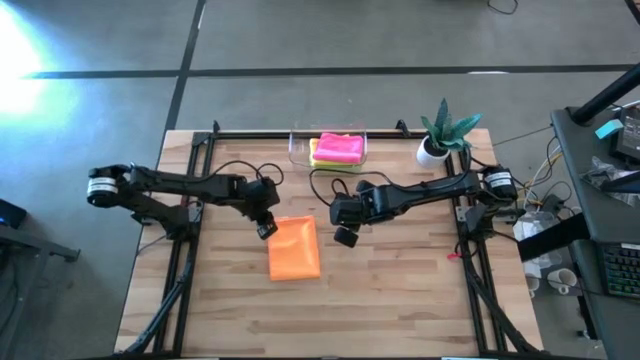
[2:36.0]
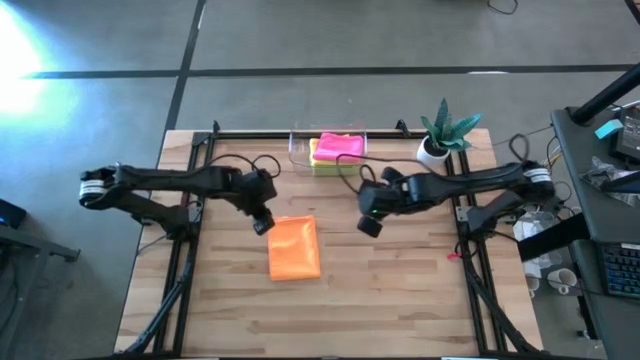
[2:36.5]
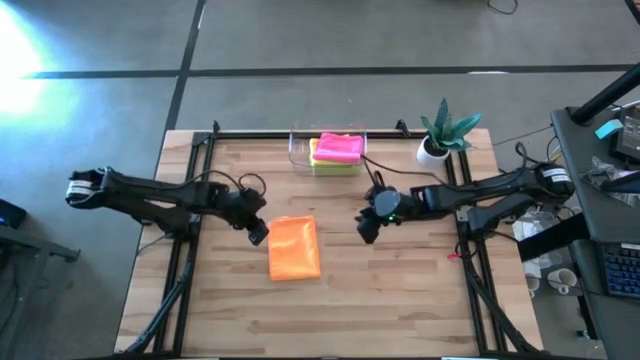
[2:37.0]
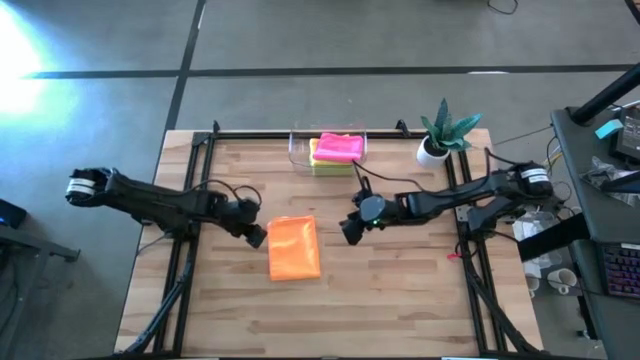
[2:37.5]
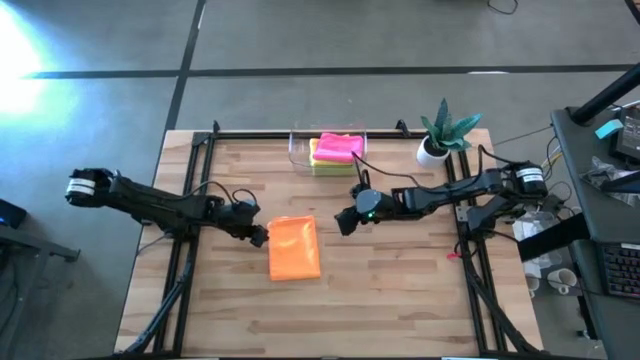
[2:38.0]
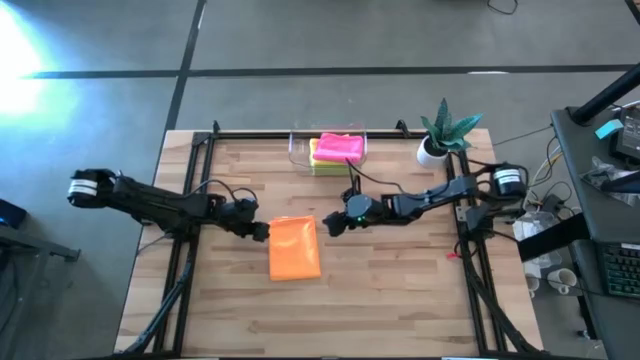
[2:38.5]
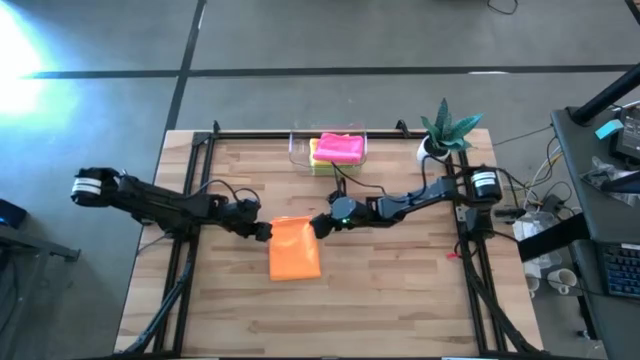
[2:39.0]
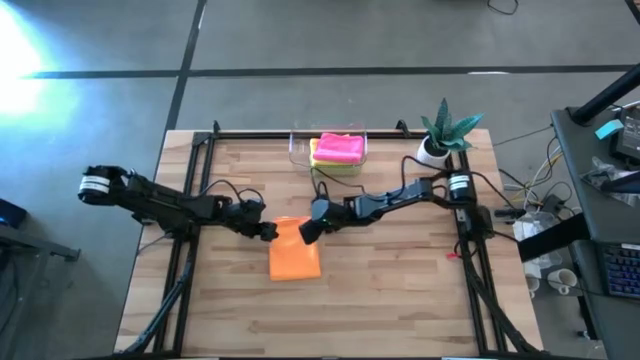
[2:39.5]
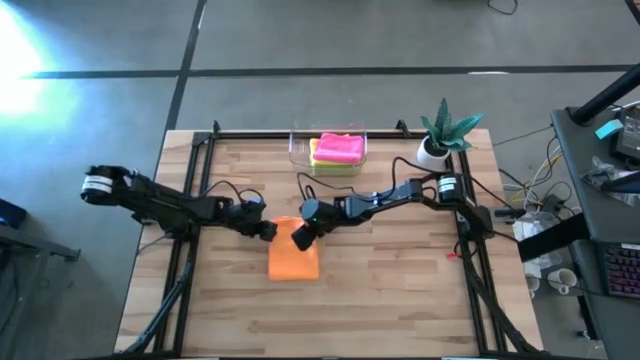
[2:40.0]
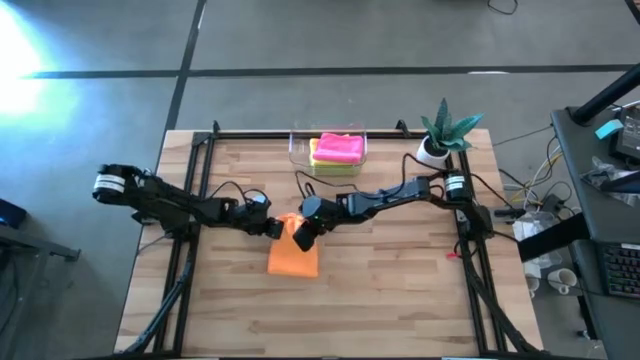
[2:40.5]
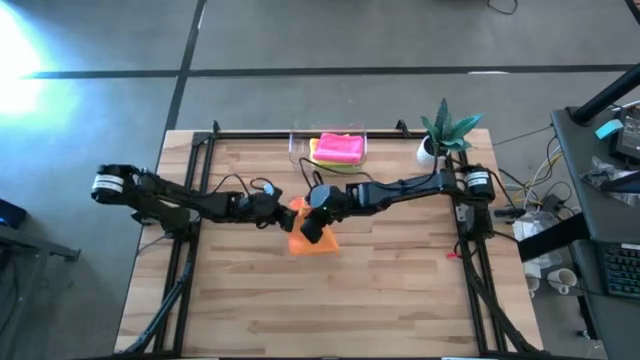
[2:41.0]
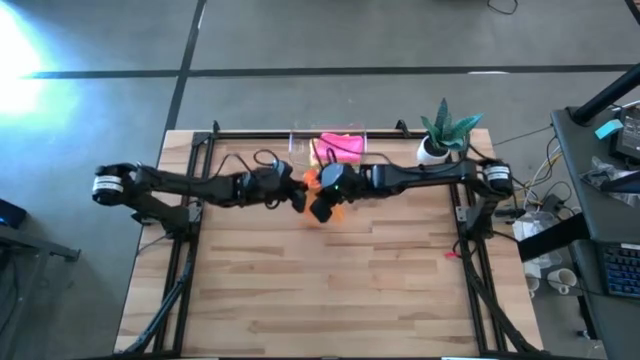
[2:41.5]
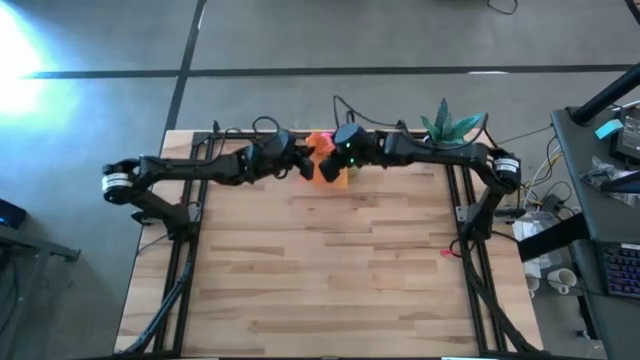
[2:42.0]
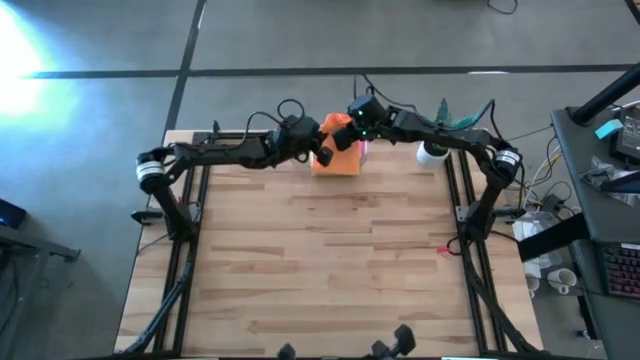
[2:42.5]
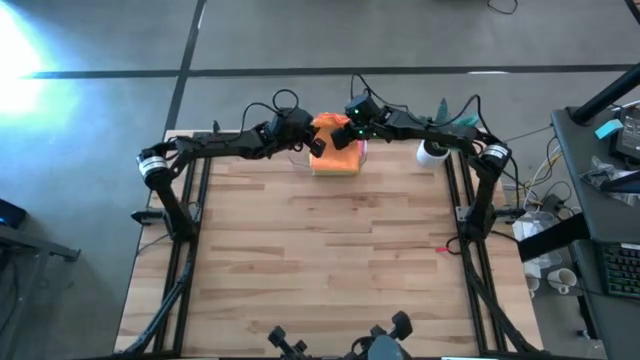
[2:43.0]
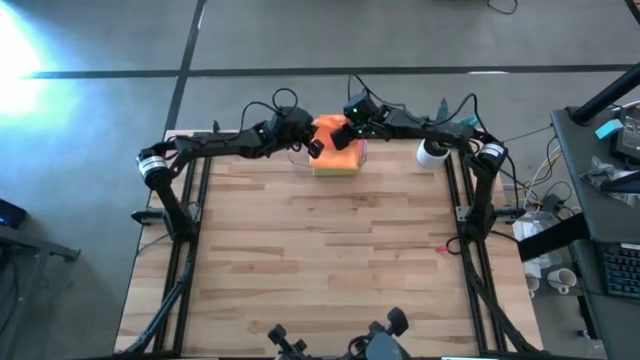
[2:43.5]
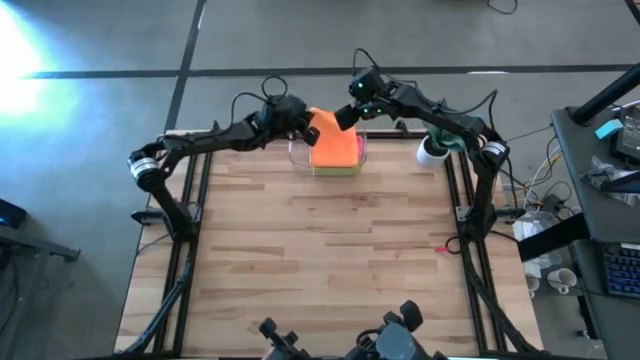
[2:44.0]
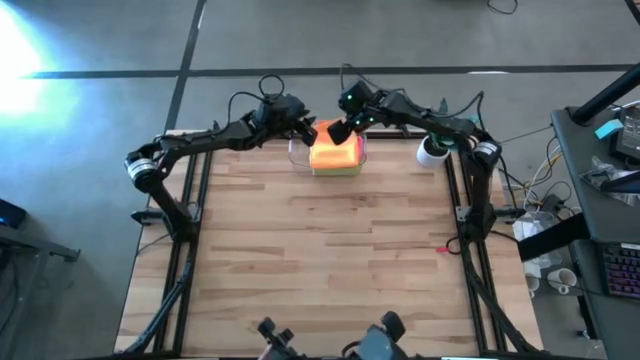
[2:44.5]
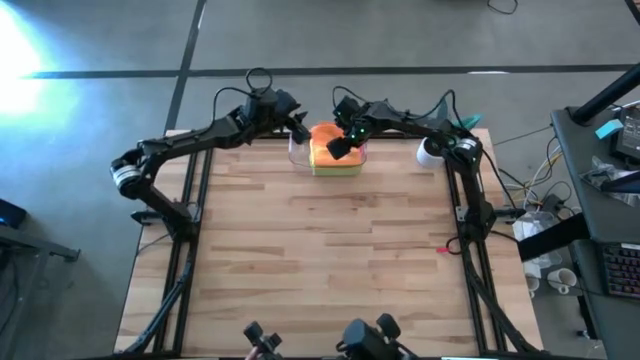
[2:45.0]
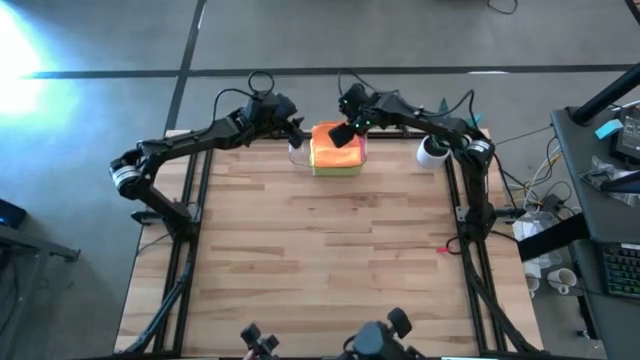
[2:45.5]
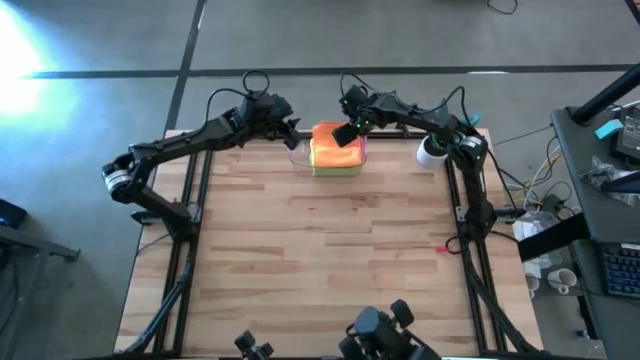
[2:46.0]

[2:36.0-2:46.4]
Task: Fold microfiber towels
Stack the orange microfiber towel on top of the pink microfiber towel into the transparent bin

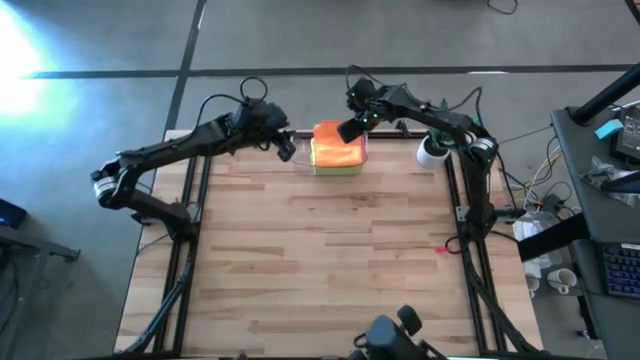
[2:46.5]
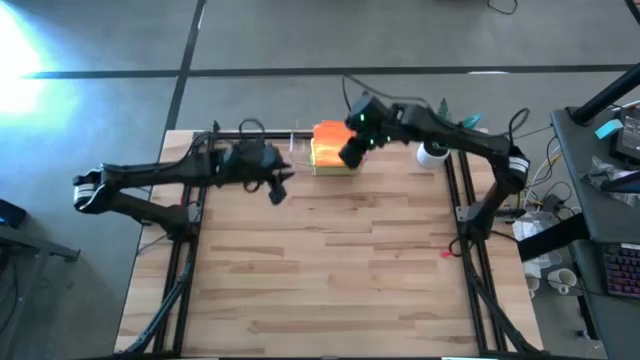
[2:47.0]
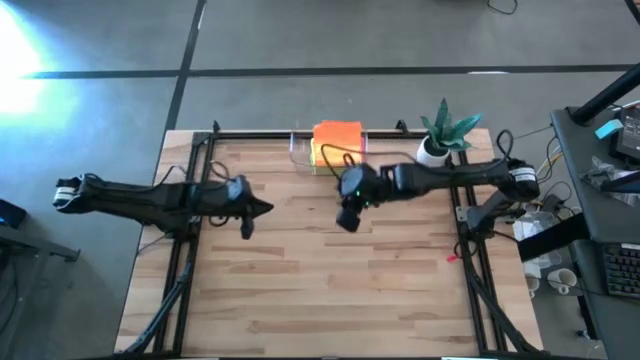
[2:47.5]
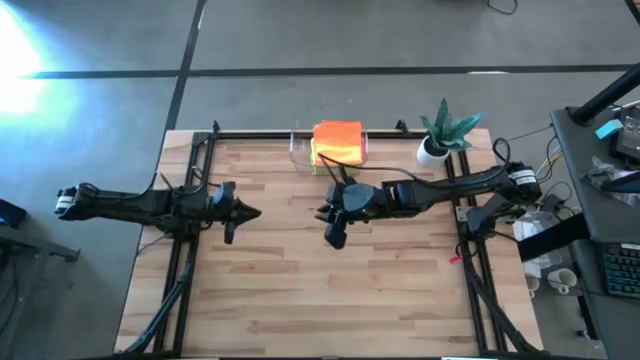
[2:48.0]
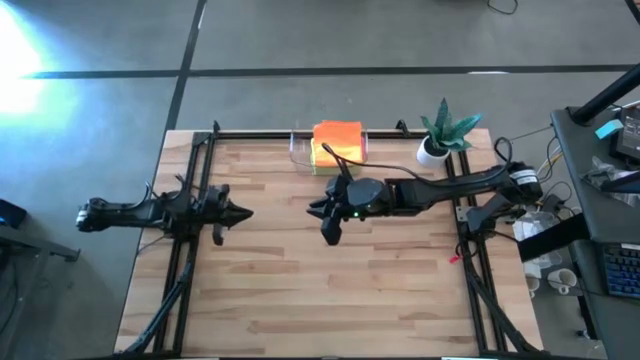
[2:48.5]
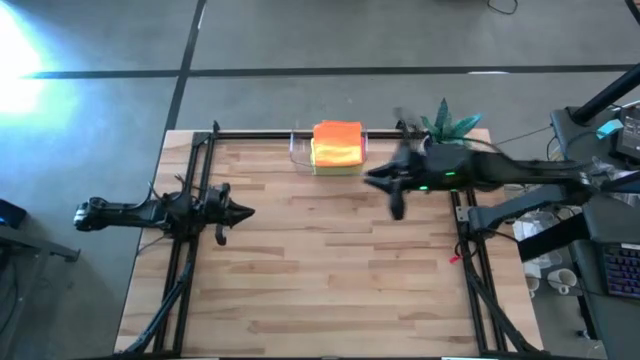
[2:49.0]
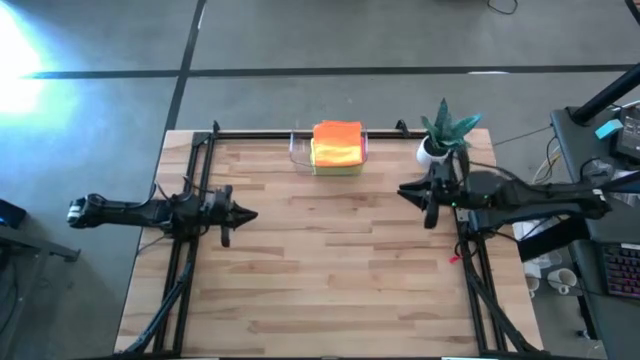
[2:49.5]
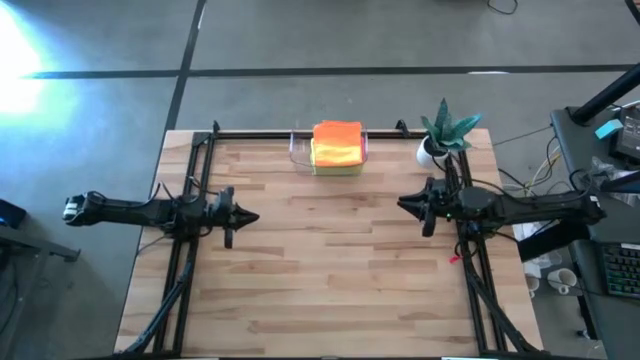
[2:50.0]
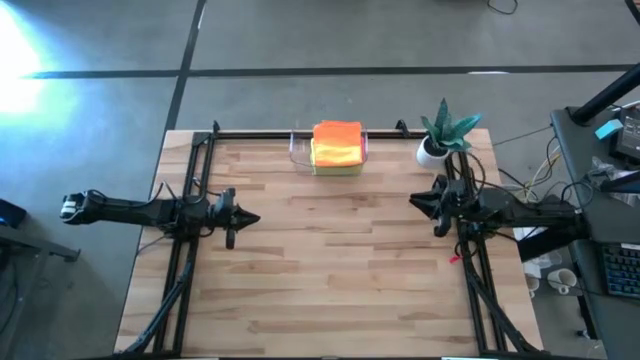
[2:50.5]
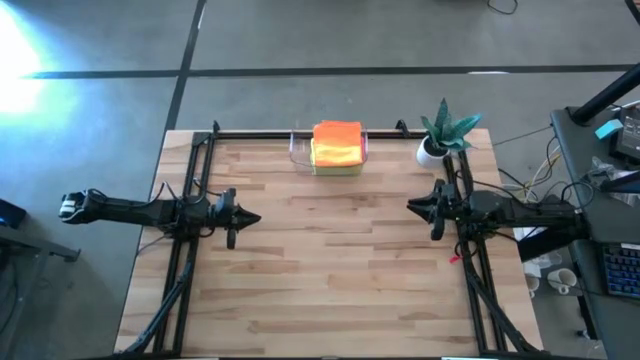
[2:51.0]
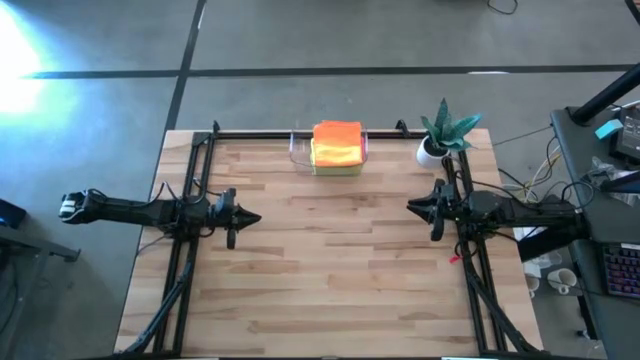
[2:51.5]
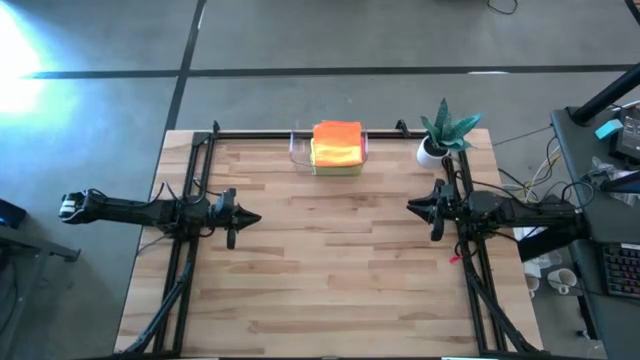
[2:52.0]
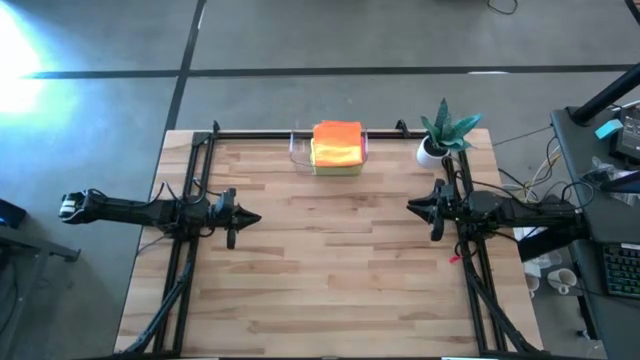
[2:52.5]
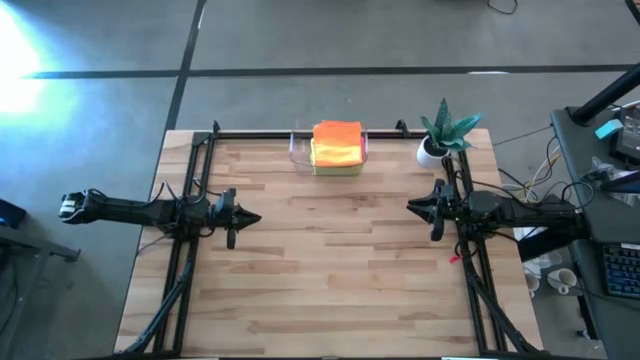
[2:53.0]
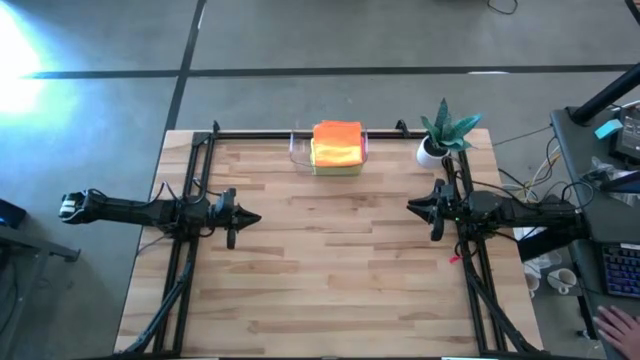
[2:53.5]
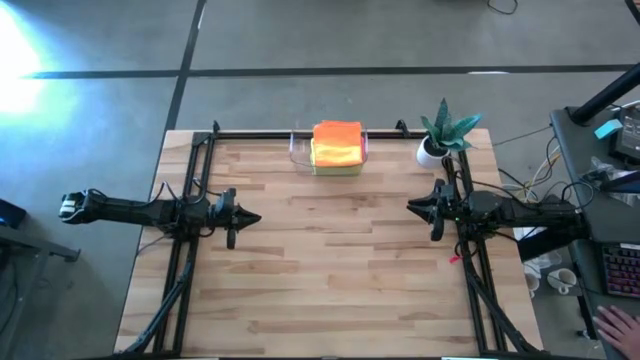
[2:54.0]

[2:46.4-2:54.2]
Return to Home Position

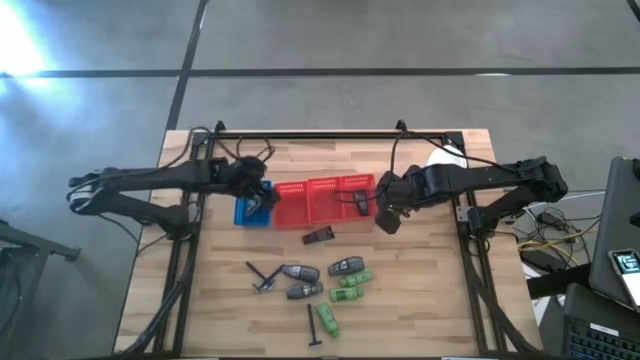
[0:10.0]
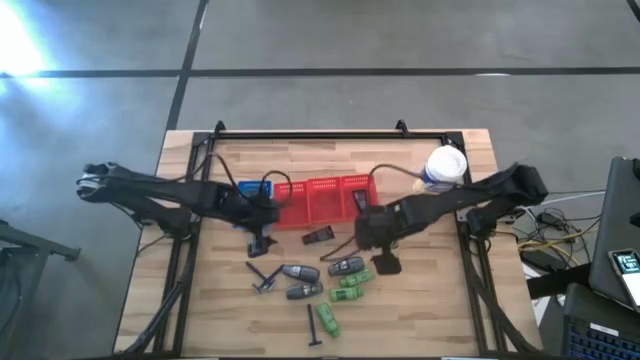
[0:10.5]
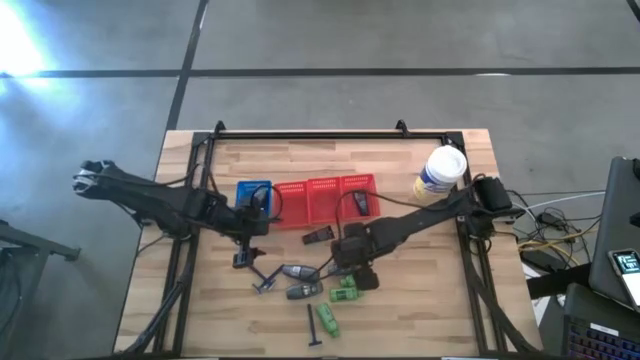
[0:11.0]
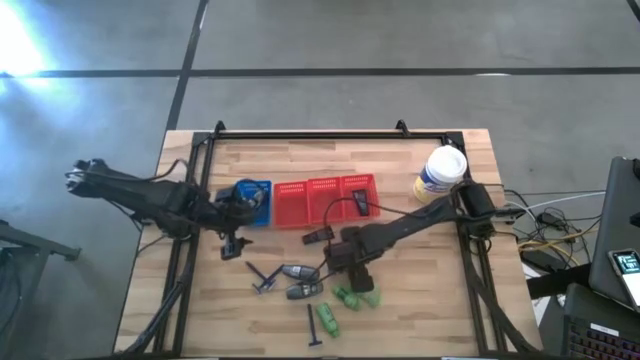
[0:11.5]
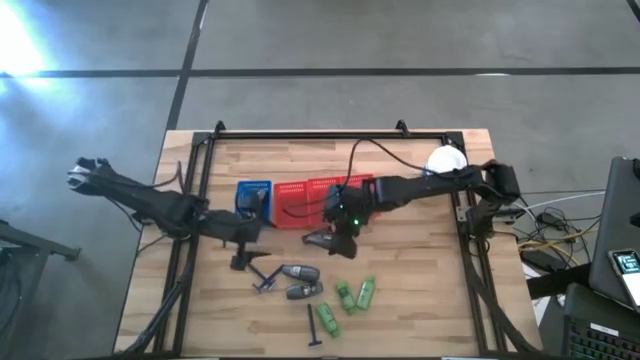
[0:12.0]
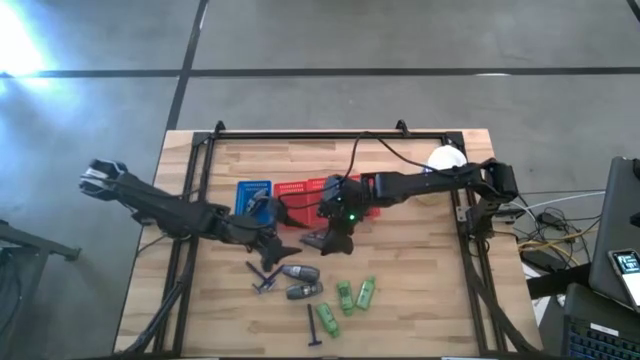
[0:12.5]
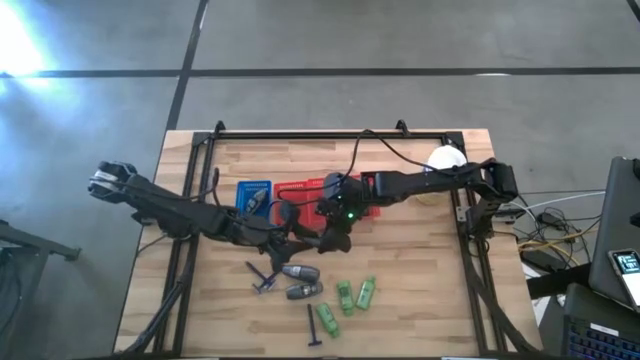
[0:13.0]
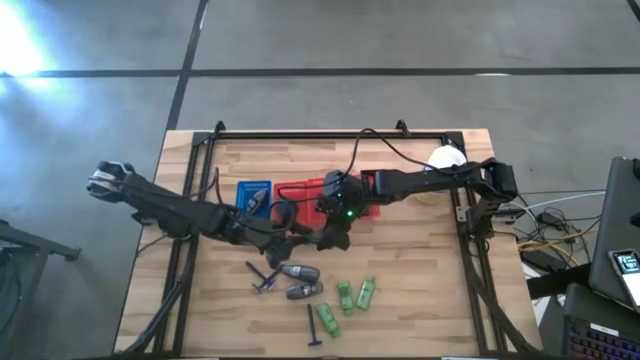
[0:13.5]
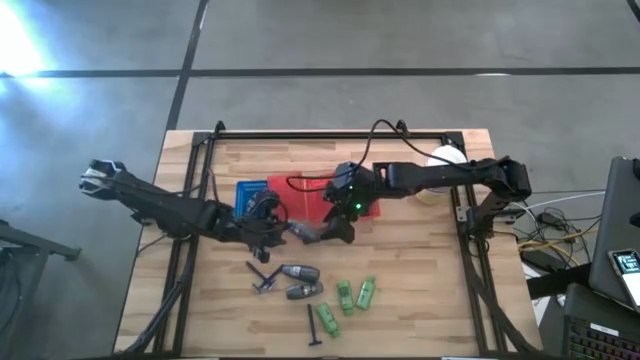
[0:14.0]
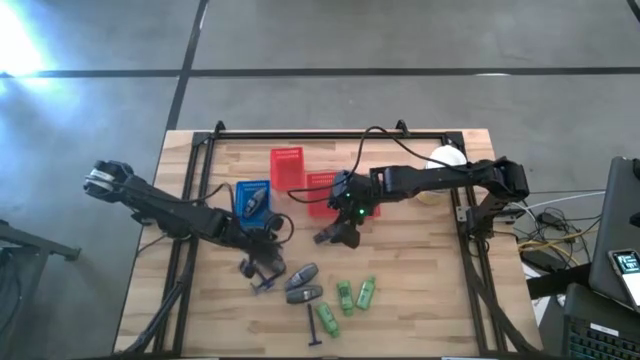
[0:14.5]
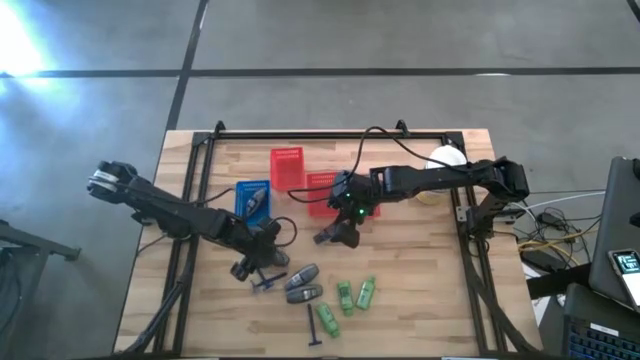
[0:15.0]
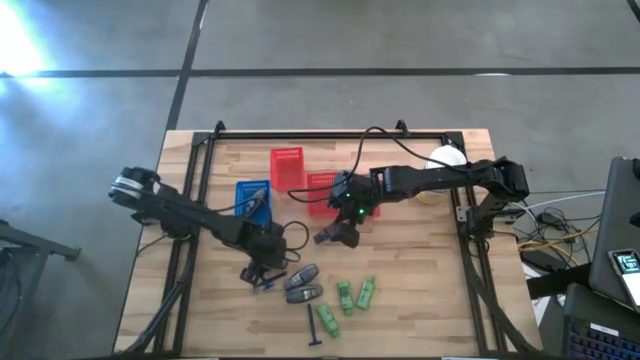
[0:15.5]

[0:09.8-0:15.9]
Task: Pick & Place Travel size toiletries
Put the gray deodorant into the blue bin
